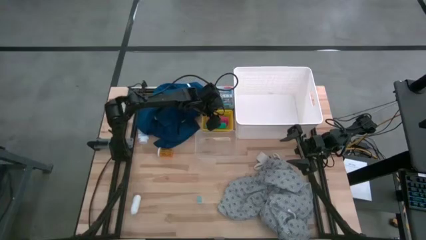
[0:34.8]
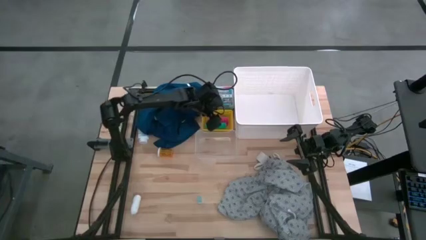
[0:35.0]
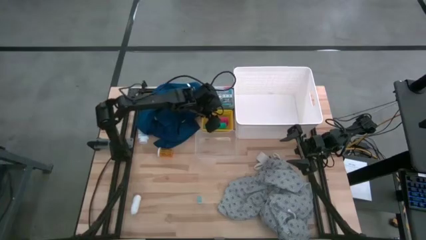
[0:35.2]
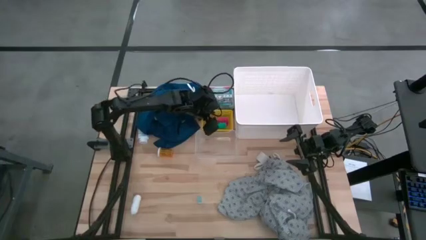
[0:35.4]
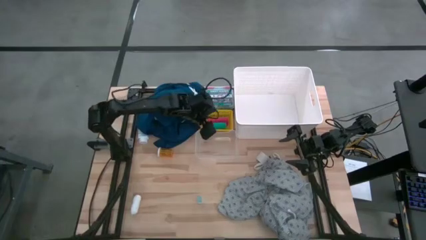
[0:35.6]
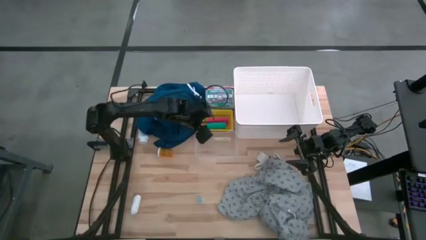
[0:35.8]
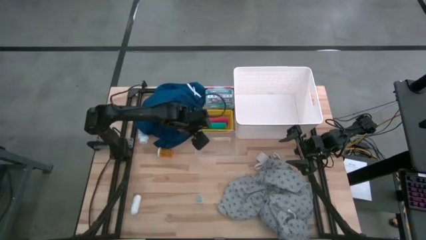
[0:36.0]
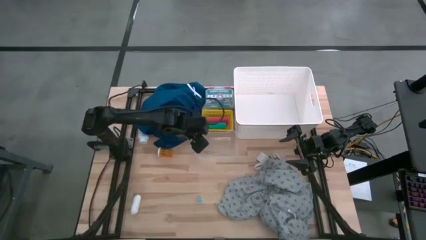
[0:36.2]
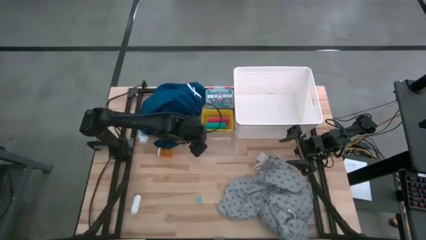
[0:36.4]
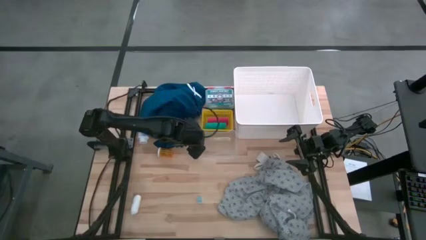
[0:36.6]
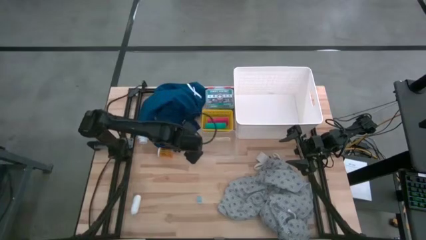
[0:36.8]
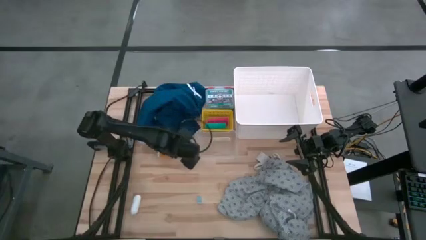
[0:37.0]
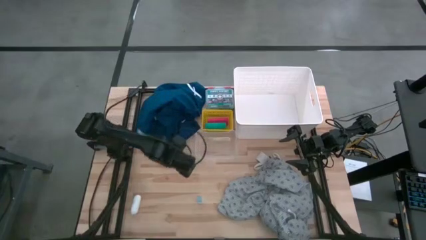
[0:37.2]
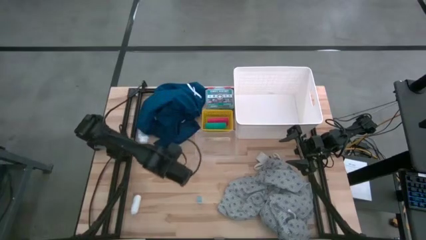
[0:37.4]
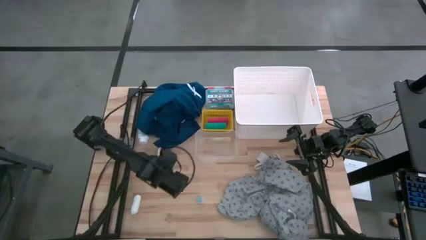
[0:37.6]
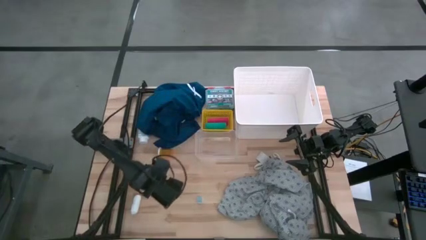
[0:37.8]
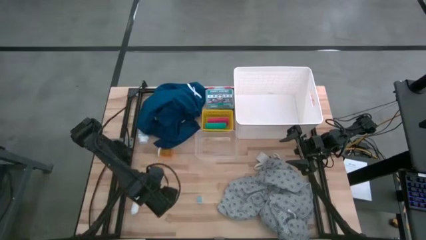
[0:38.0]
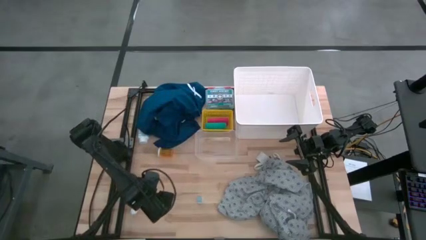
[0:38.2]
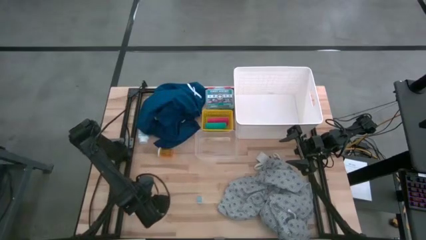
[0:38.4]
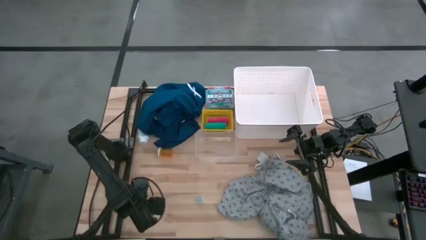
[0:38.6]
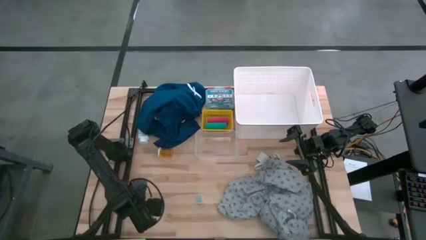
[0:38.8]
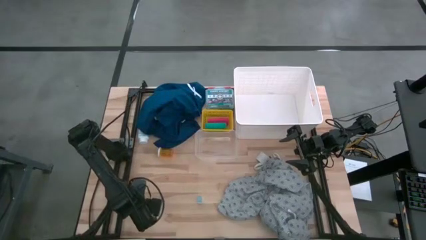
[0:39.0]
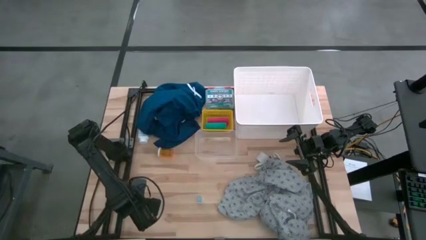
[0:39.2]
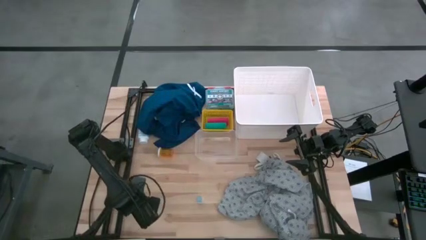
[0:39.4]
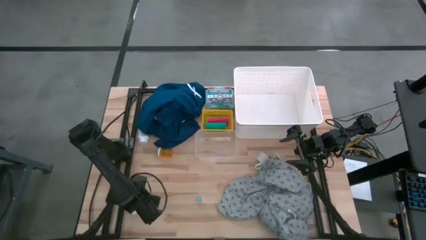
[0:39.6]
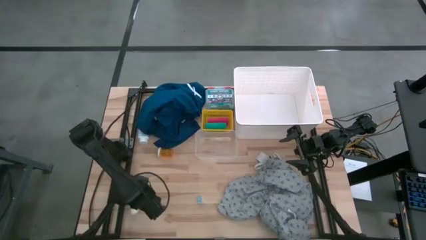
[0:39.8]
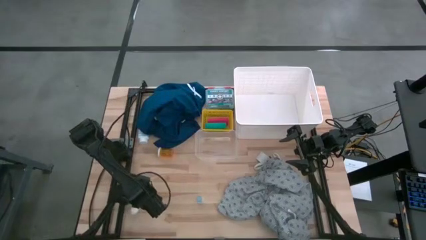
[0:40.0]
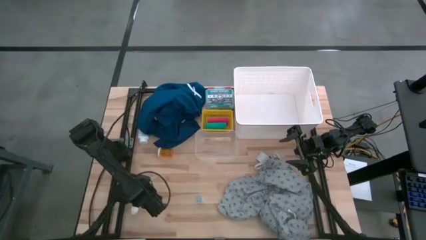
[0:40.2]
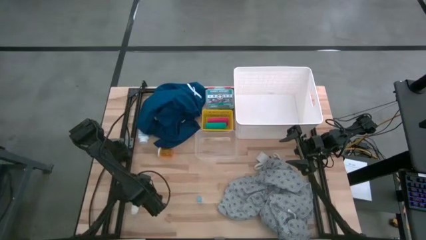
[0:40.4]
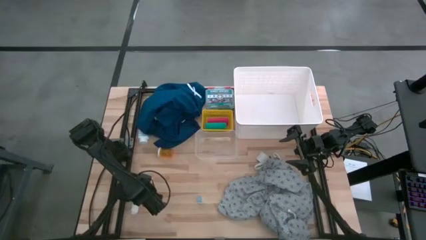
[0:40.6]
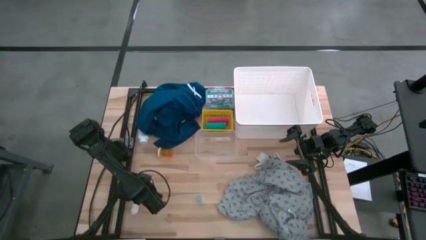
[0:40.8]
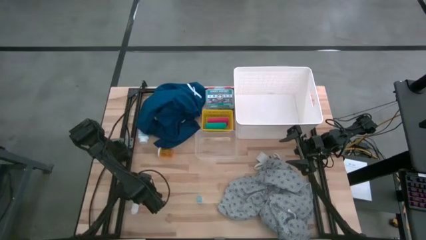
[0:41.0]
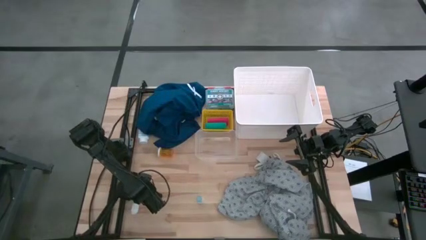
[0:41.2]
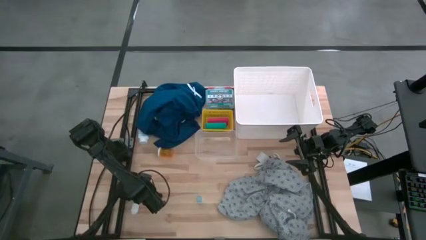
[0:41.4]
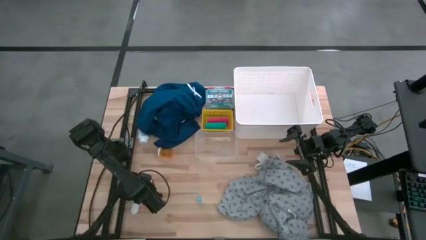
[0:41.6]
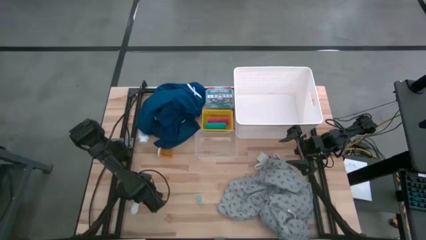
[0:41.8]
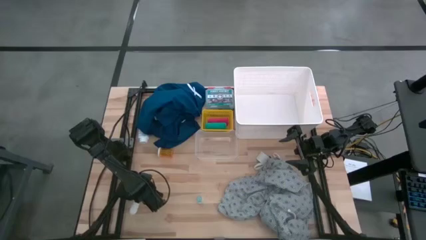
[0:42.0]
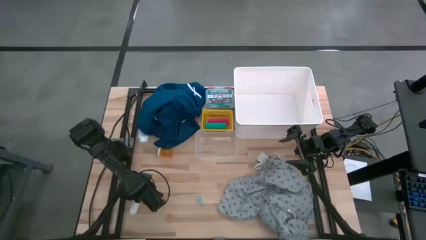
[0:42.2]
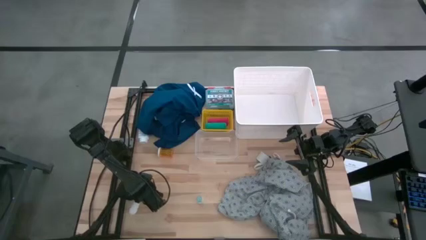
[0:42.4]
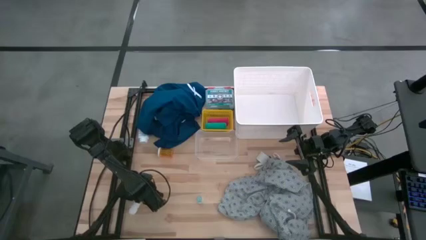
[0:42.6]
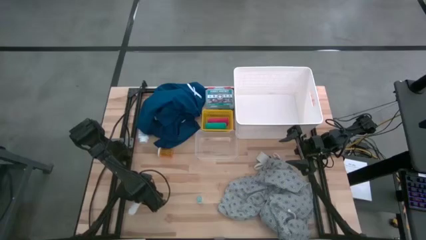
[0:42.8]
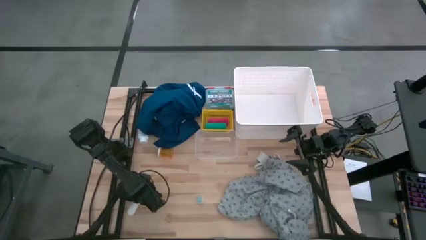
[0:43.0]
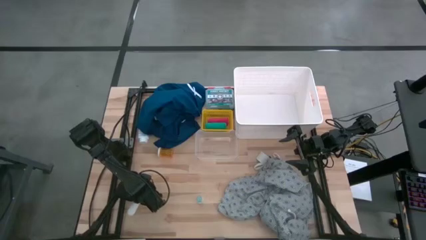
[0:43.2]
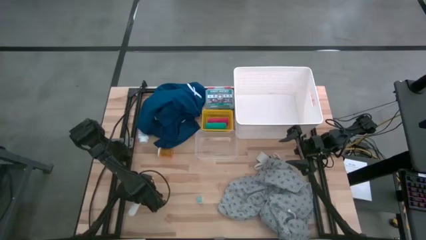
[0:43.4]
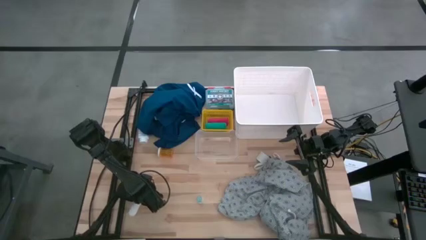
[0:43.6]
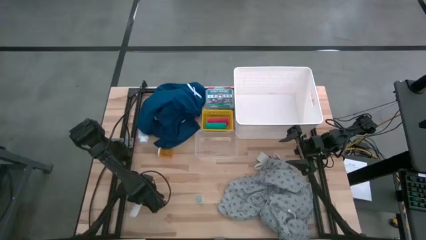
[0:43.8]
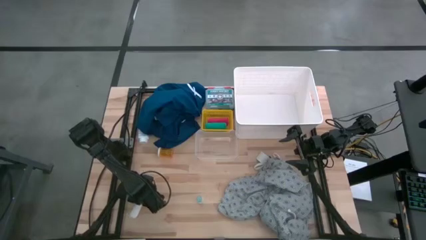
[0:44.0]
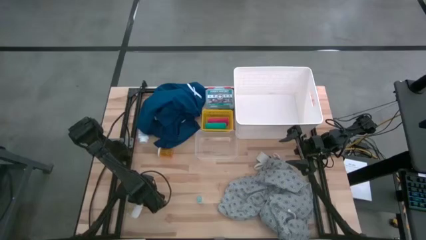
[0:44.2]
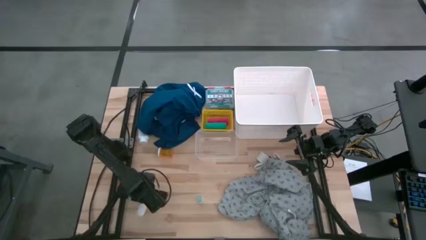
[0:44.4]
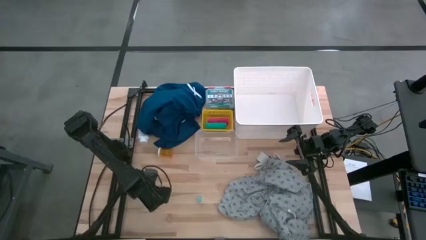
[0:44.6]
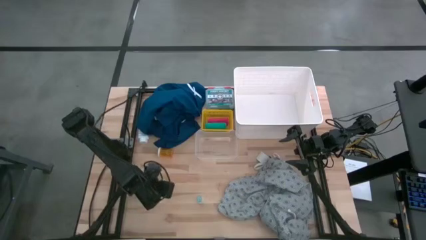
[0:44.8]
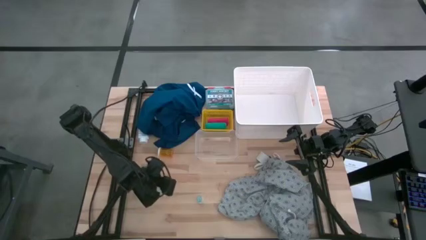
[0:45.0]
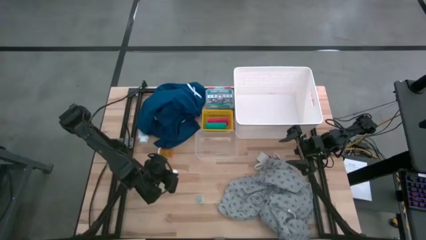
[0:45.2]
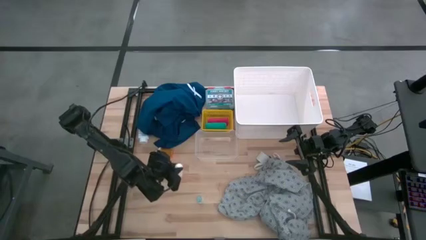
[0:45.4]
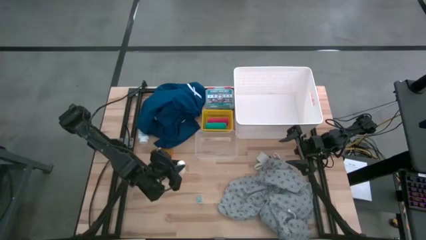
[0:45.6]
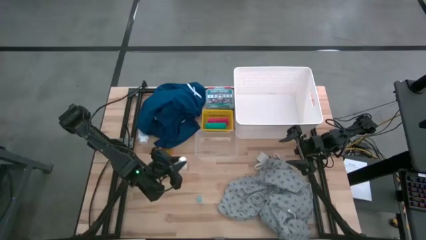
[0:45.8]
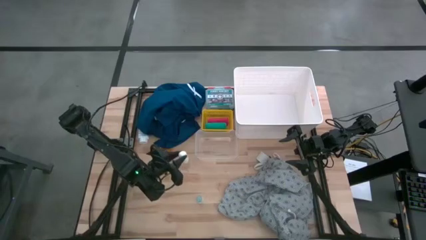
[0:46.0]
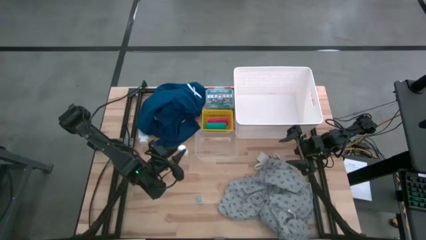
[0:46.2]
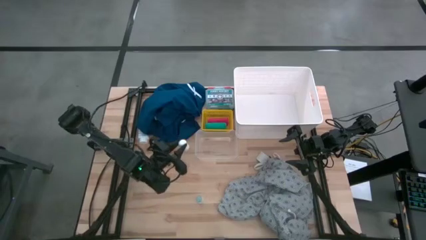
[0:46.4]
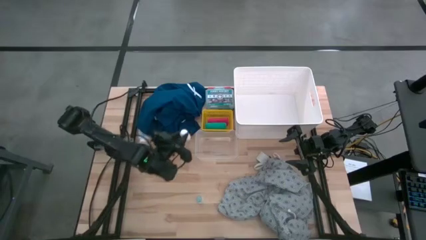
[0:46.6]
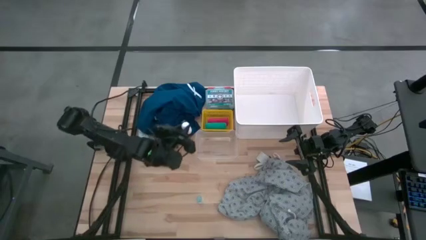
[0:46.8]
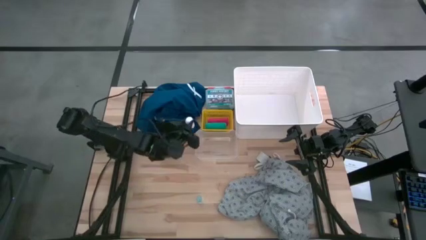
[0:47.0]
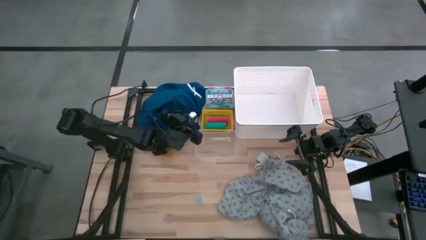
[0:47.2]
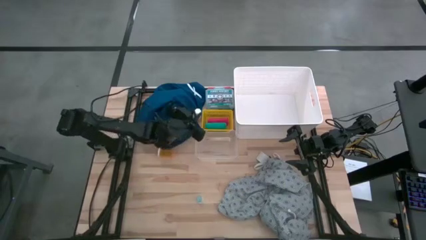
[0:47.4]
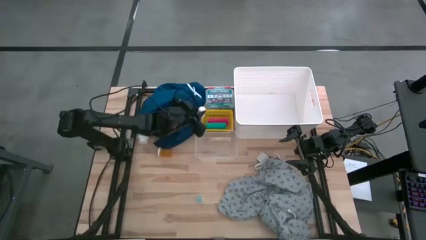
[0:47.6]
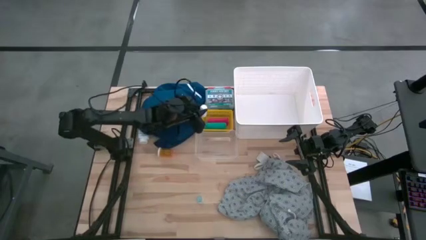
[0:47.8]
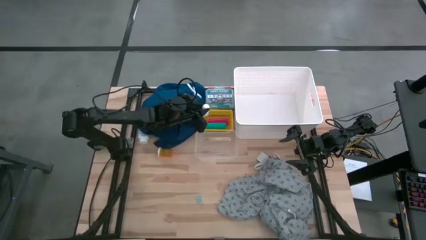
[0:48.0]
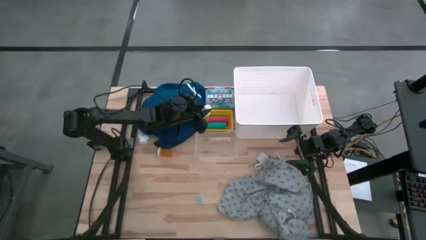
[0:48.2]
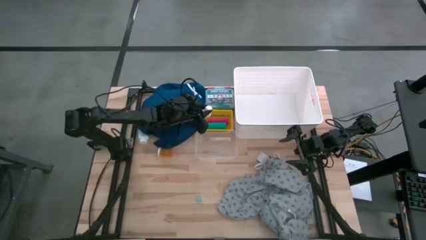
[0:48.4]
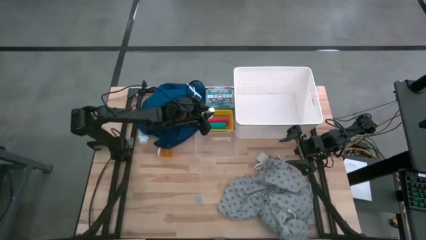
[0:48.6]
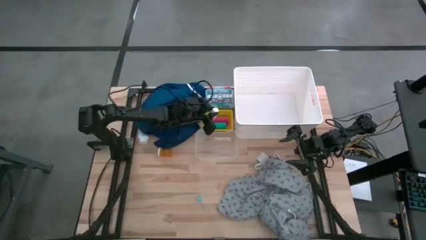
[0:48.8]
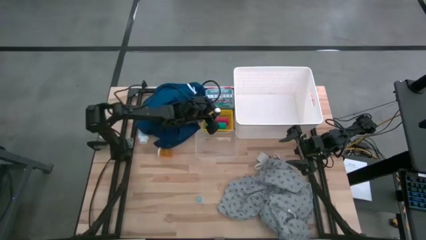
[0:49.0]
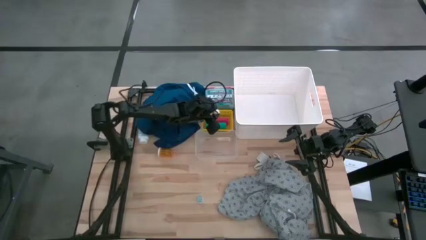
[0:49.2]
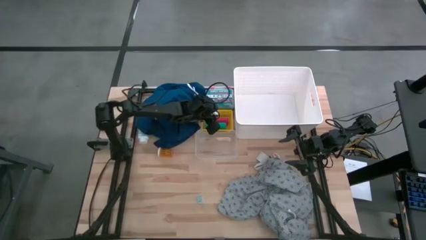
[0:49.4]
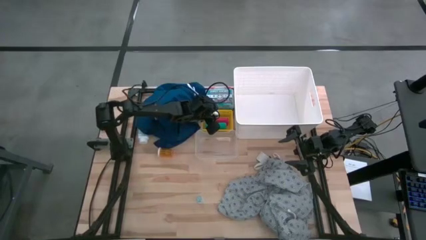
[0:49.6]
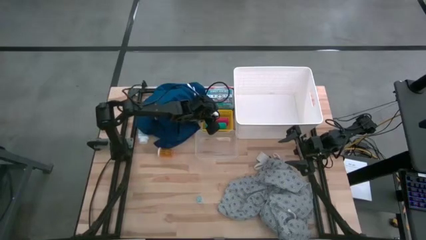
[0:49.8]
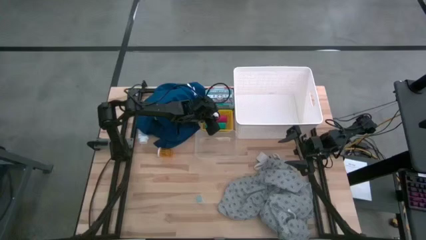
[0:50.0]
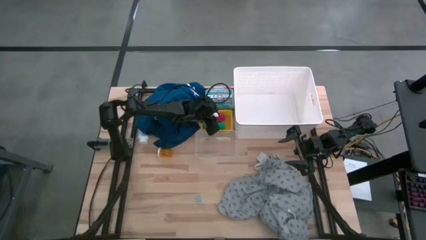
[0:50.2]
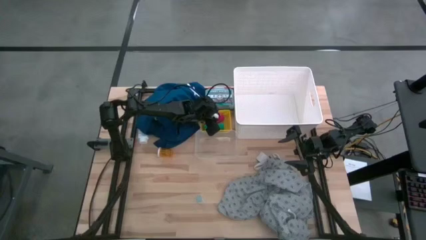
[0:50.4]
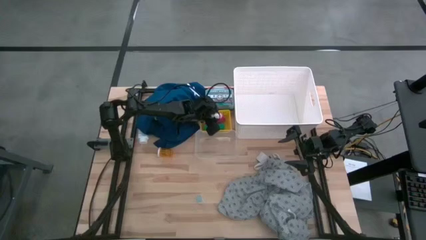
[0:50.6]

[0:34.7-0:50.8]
Task: Pick & Place Medicine items
Put the white bandage into the yellow bin
